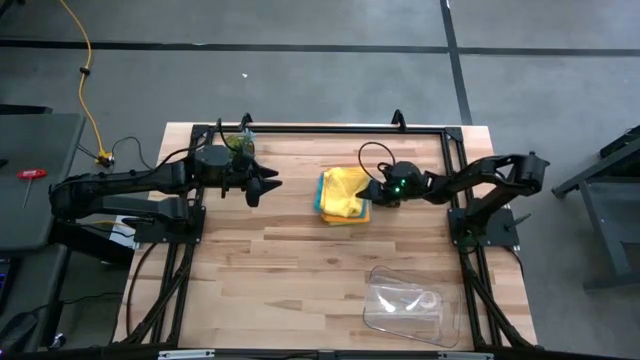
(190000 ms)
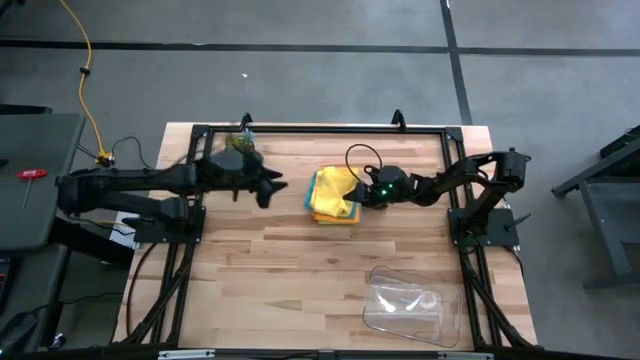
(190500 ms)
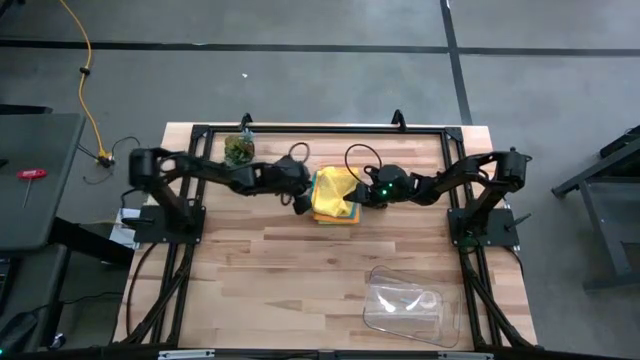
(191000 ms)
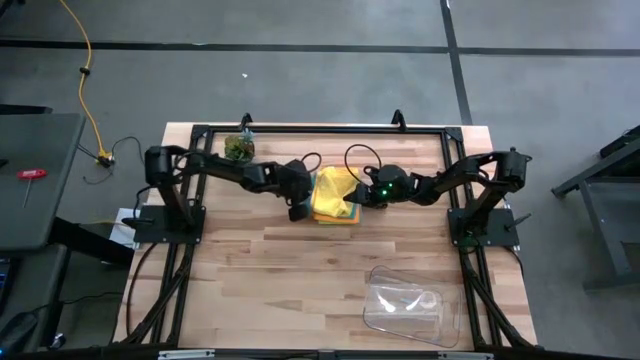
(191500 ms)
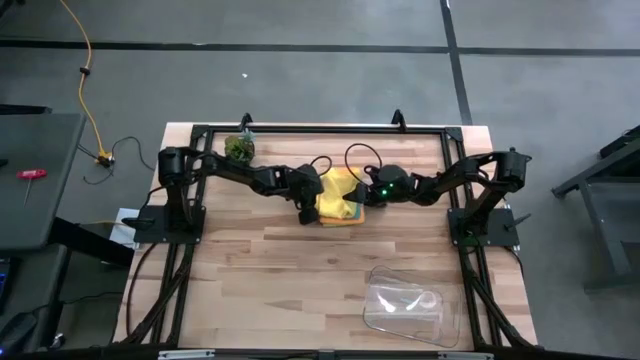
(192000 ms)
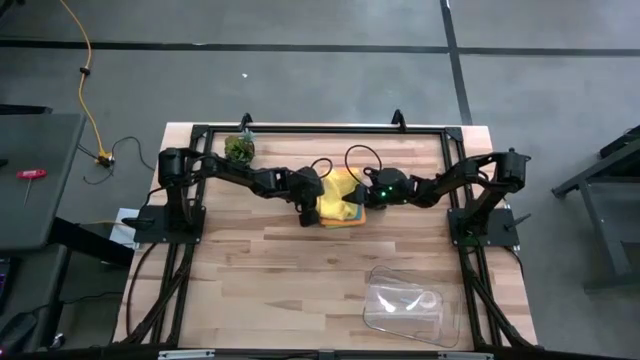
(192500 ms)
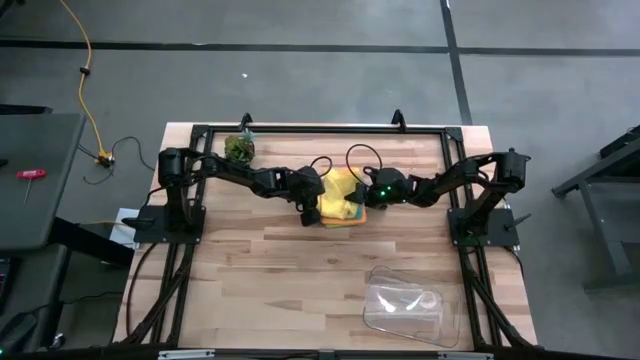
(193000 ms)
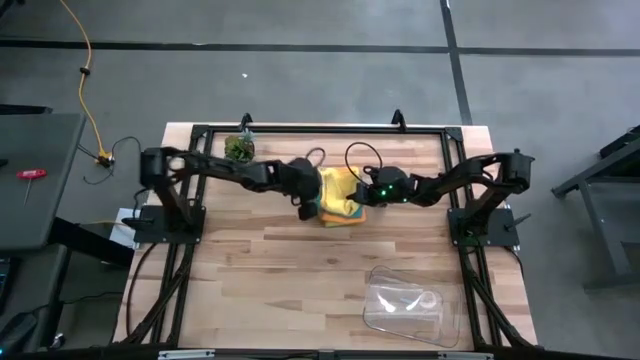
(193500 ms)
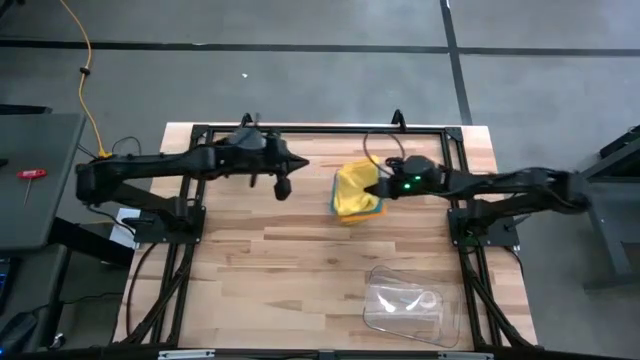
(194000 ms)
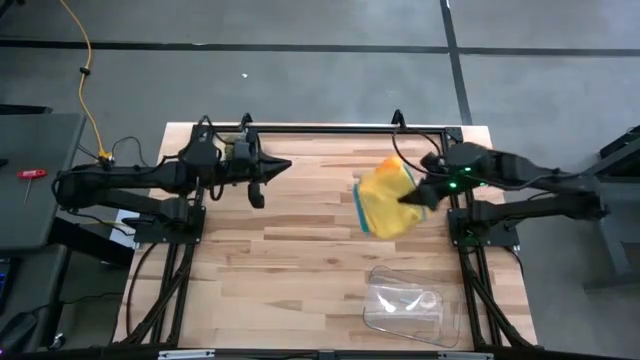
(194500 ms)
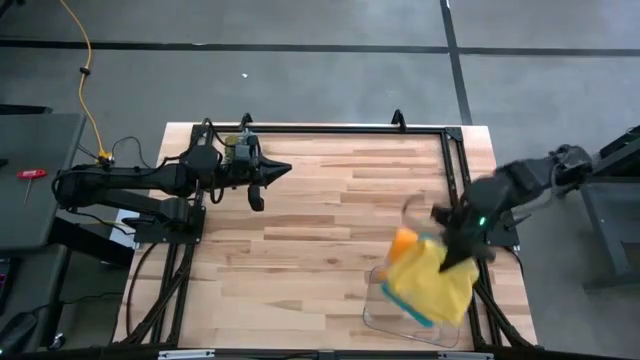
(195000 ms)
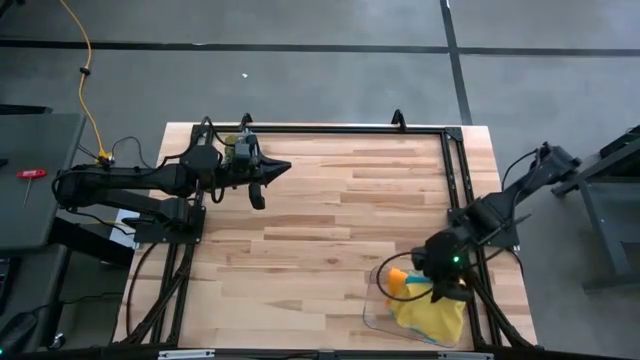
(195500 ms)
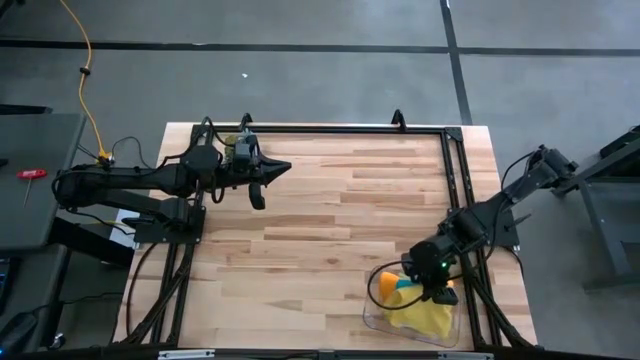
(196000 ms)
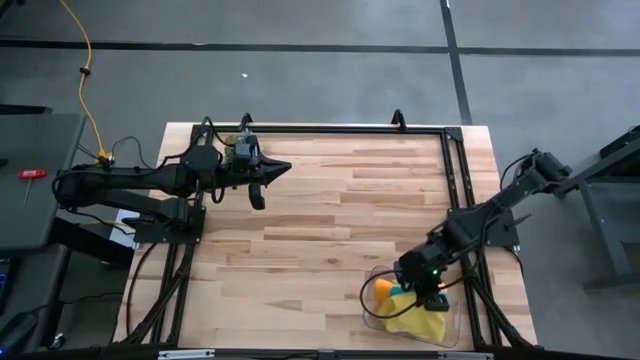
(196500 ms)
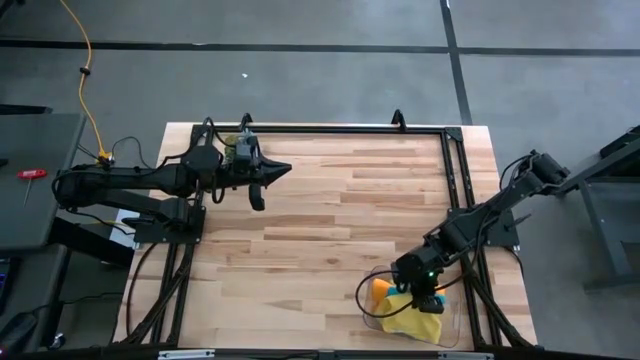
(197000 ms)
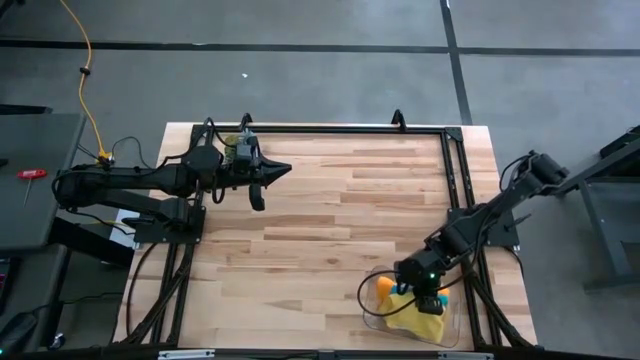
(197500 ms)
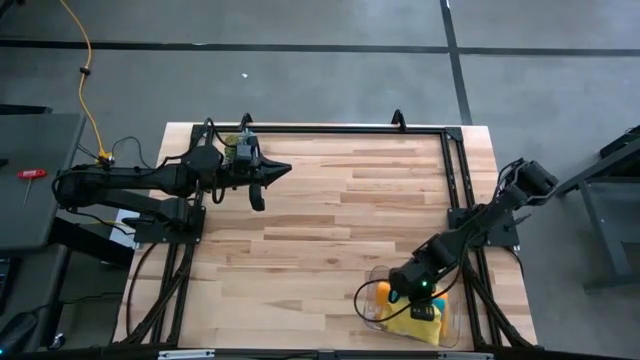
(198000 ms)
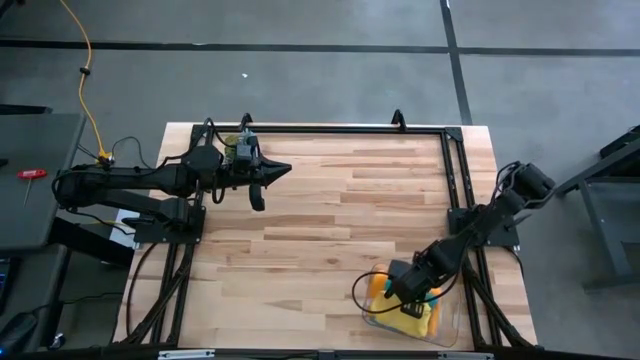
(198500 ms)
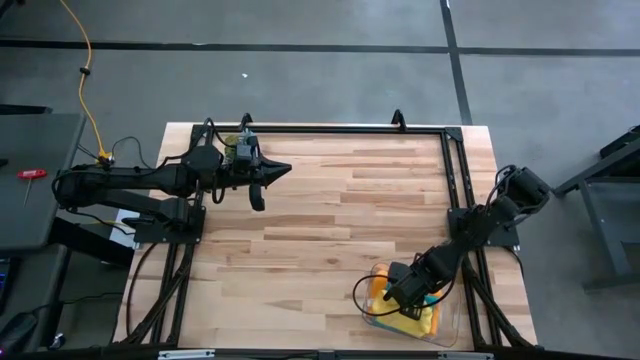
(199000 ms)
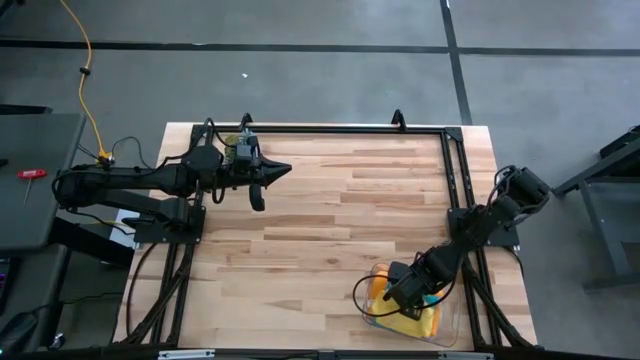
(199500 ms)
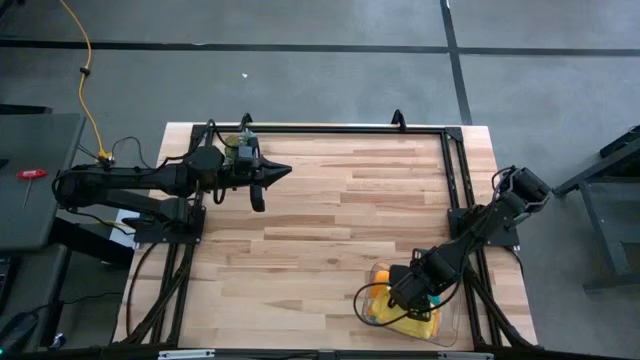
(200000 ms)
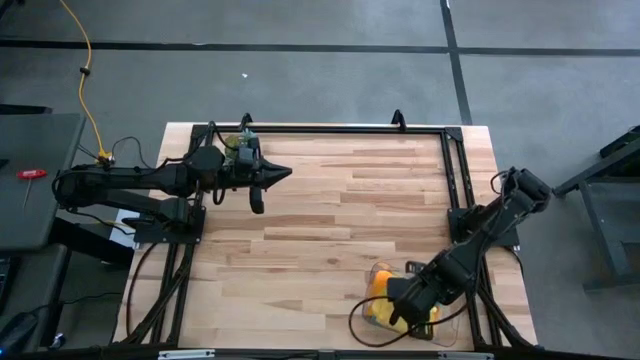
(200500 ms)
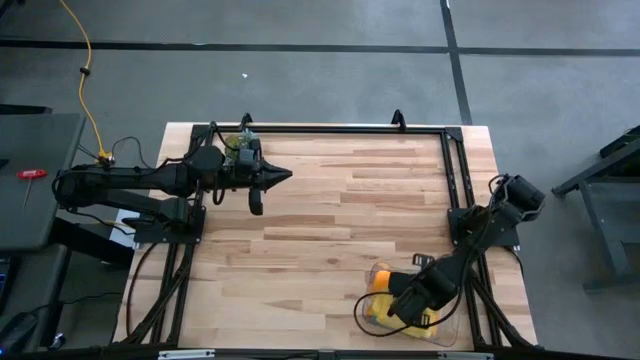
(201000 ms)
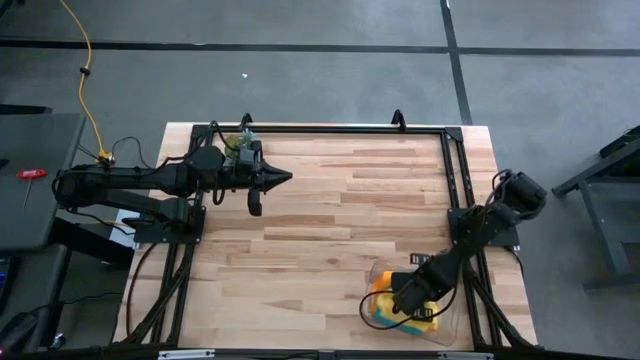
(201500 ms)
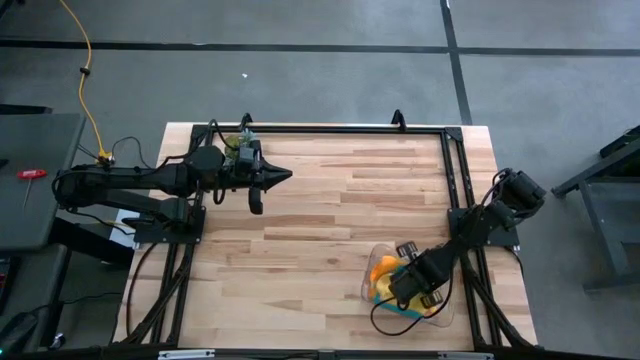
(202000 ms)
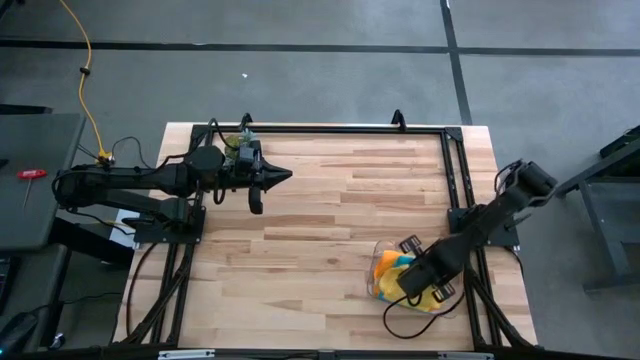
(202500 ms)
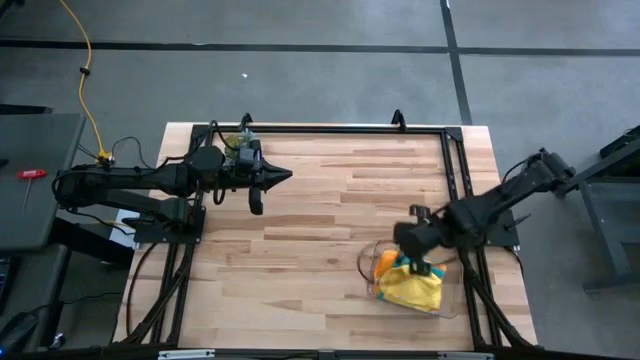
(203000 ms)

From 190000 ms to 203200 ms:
Task: Fold microfiber towels
Put the stacked folded cloths into the bin

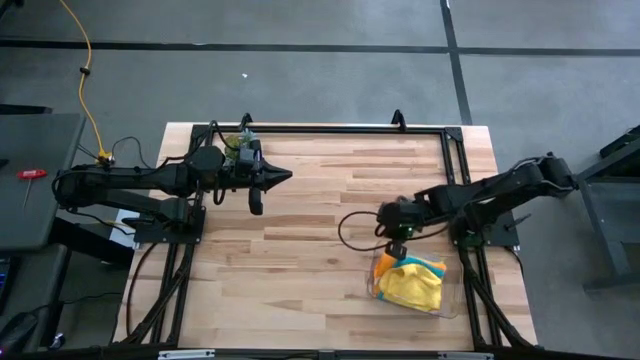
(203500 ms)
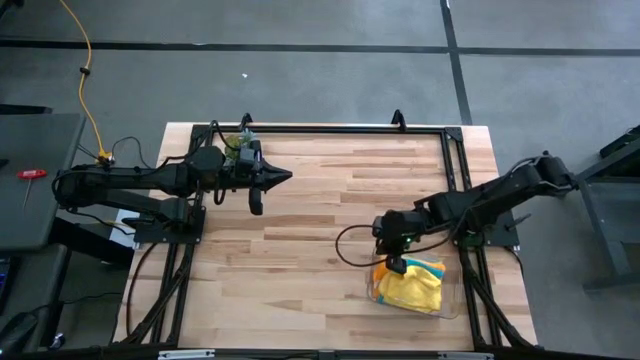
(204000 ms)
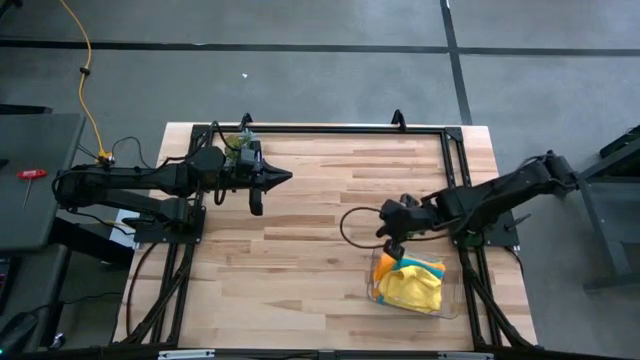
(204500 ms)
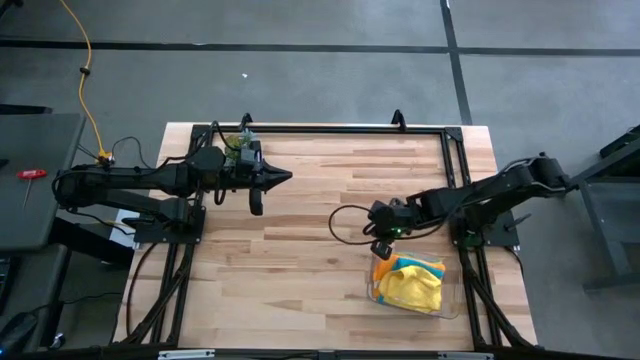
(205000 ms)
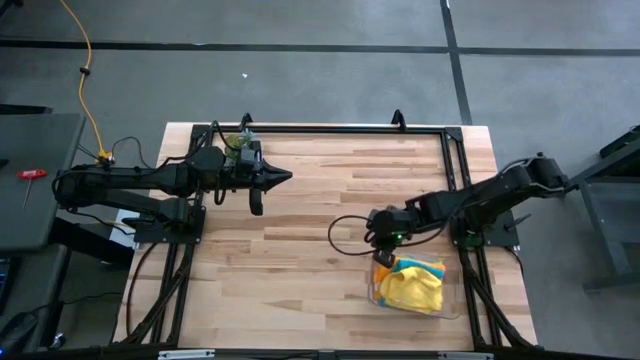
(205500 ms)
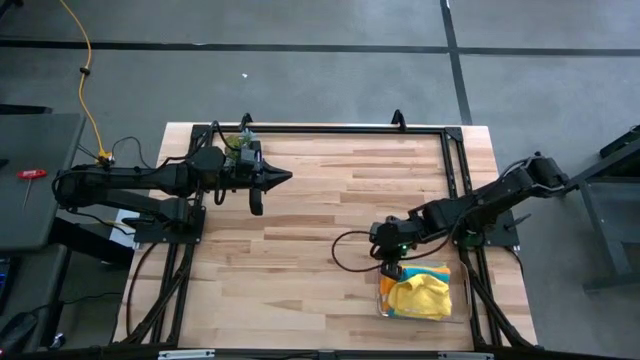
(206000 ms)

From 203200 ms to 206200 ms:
Adjust the transparent bin

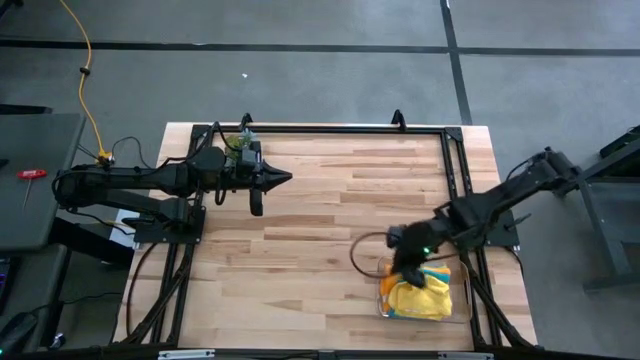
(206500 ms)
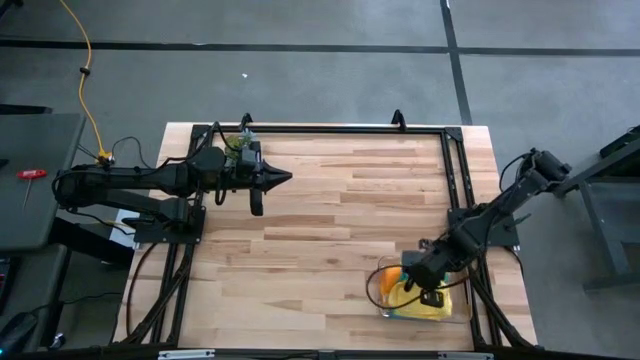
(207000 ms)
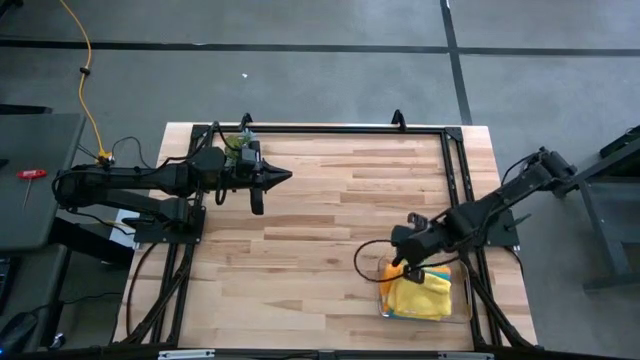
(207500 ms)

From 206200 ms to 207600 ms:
Adjust the yellow cloth

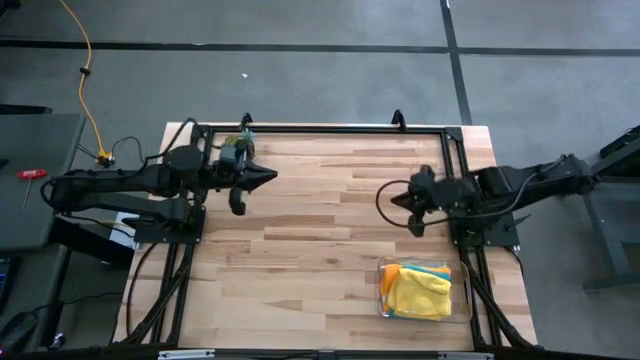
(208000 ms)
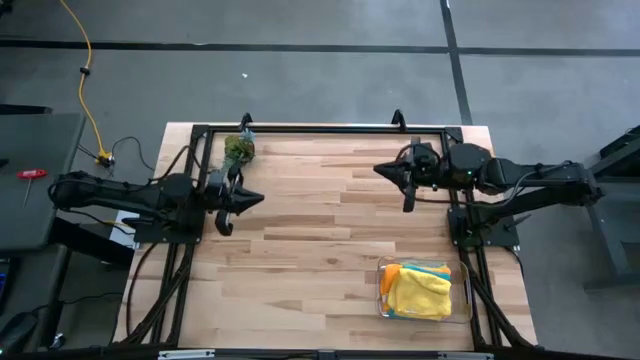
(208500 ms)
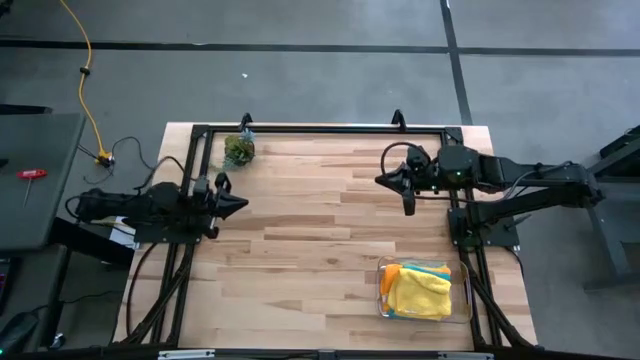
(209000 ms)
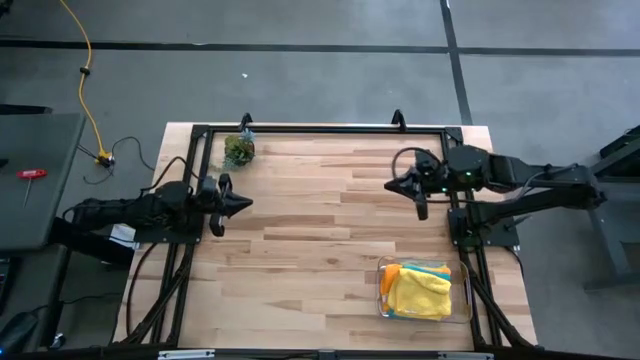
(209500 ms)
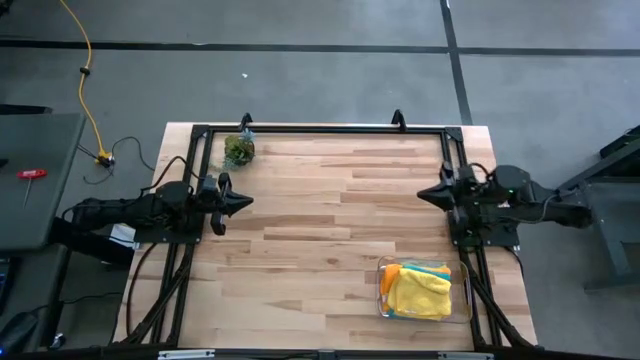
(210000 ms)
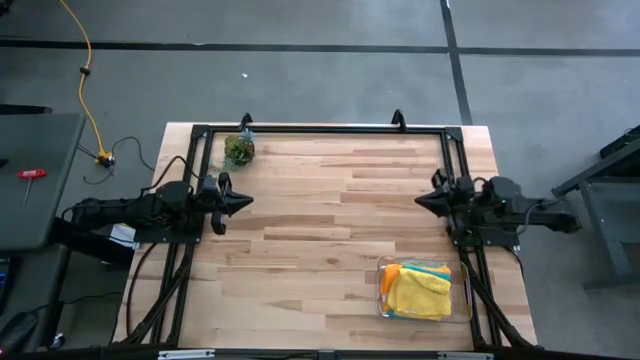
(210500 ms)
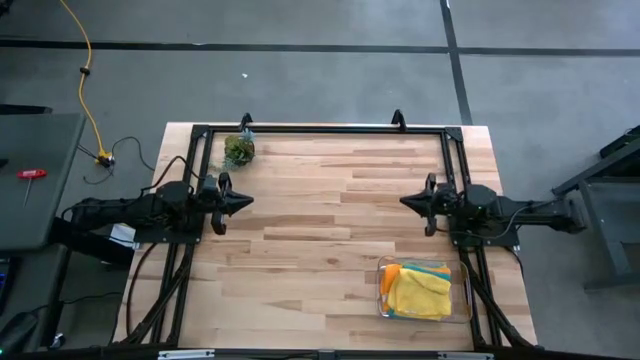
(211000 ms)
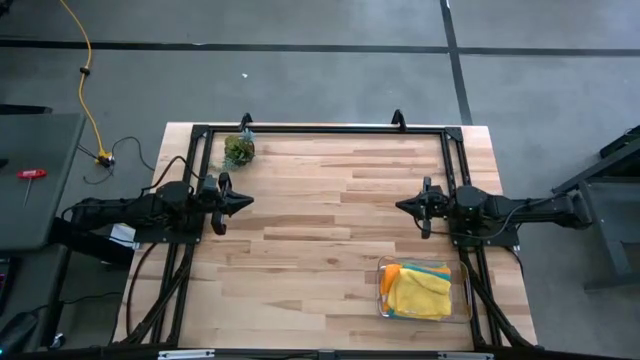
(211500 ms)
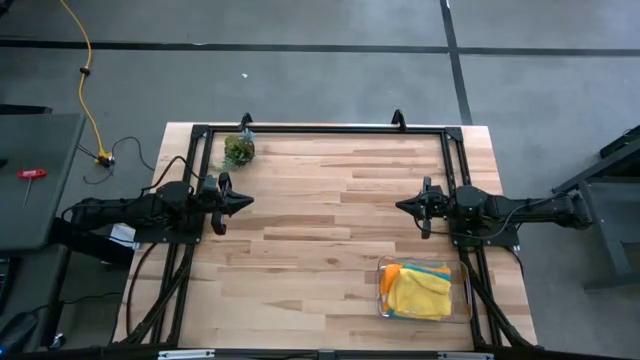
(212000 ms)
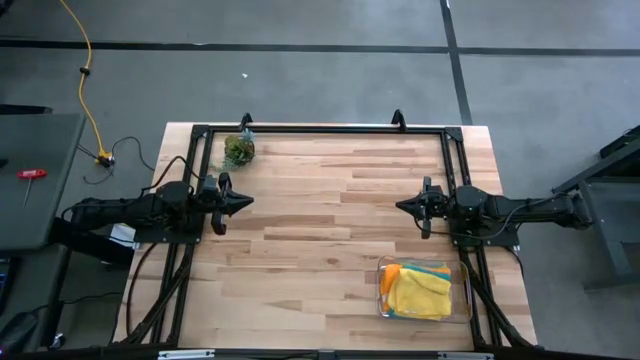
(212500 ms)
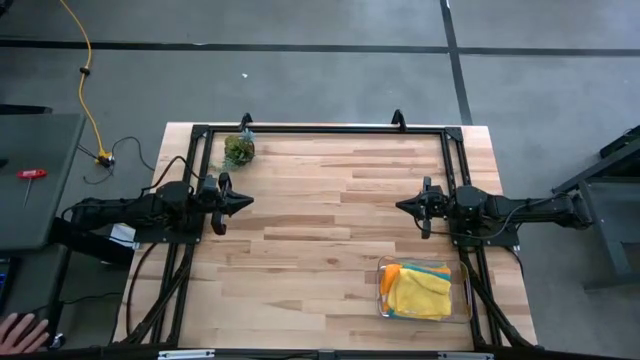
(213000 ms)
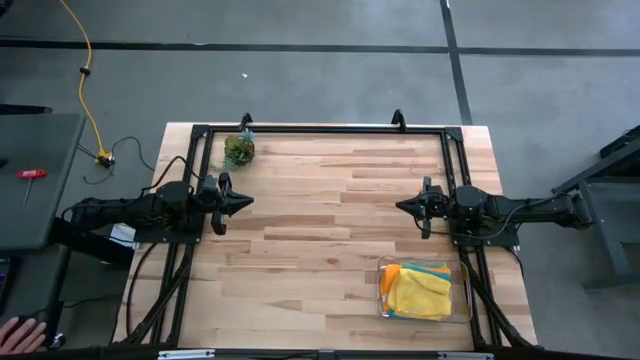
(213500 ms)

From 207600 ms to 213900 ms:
Return to Home Position
